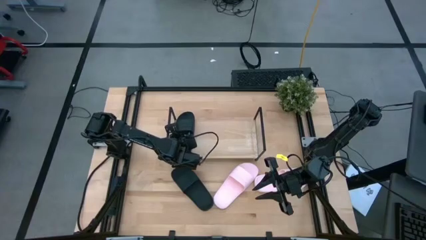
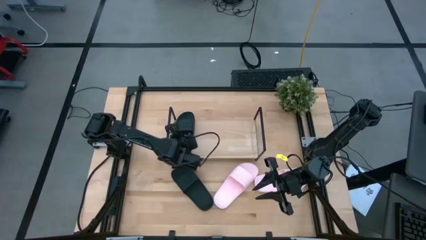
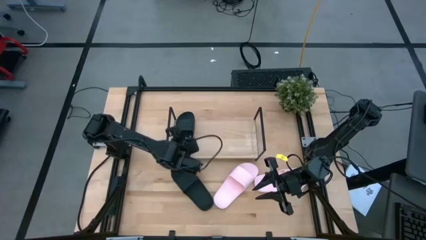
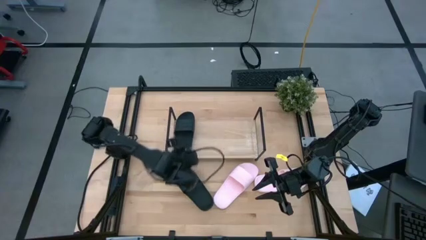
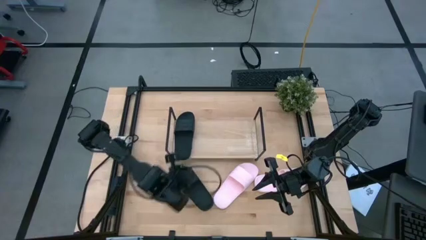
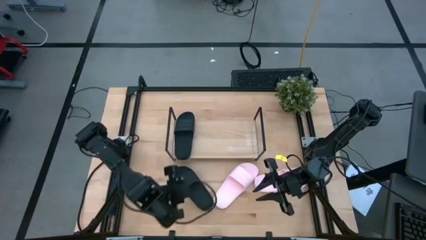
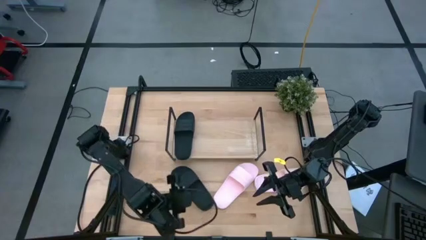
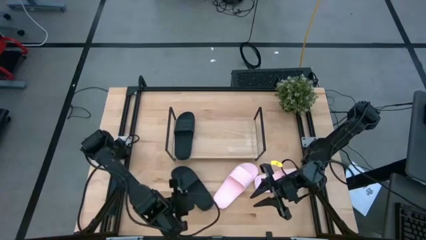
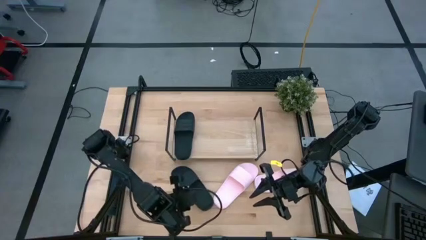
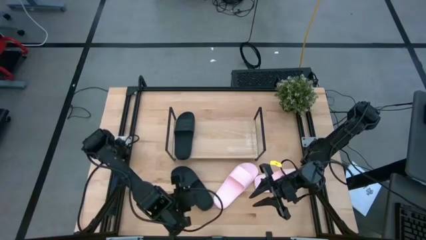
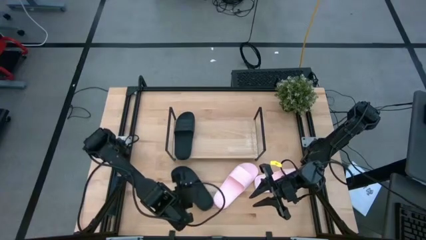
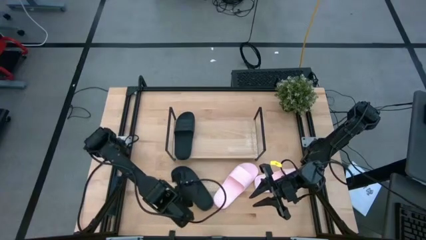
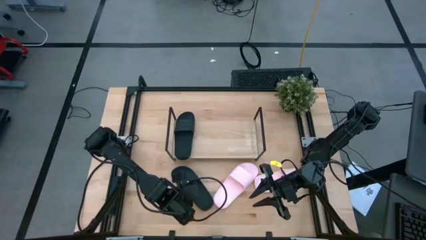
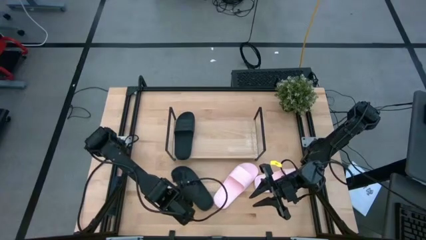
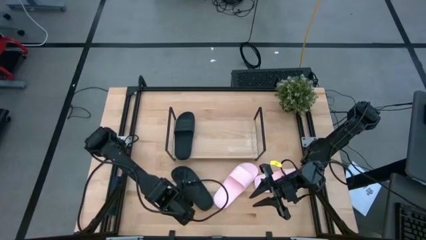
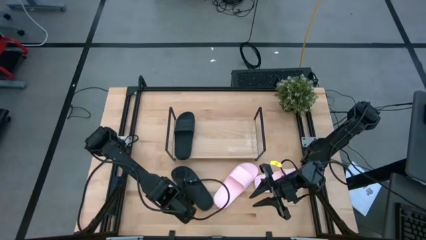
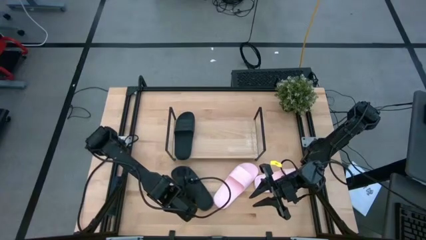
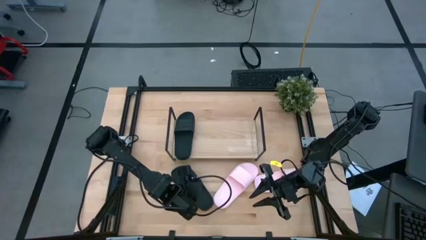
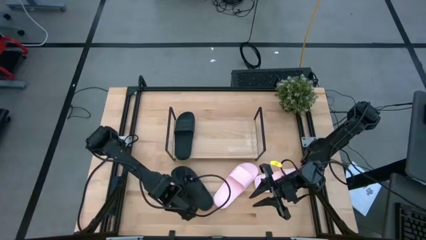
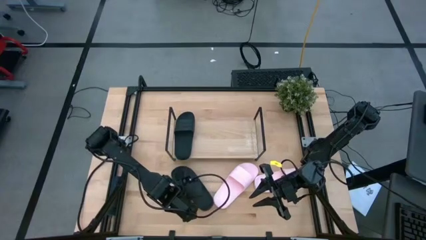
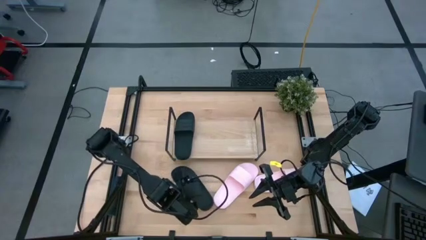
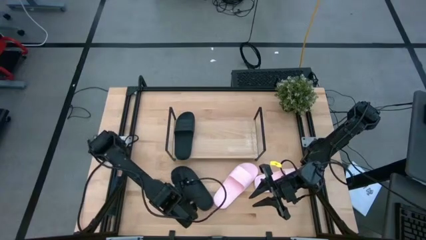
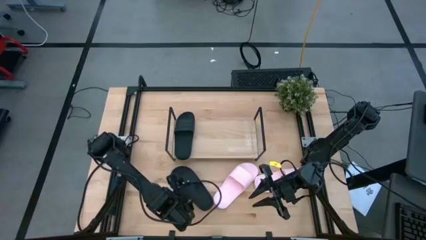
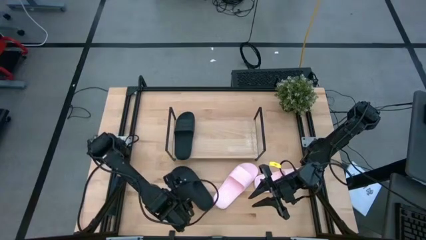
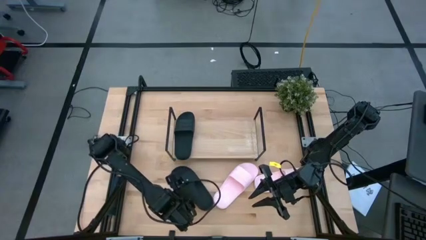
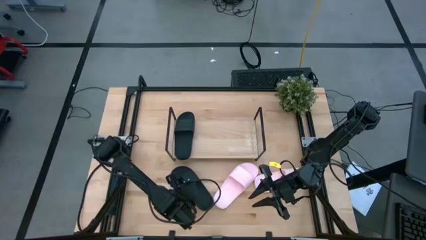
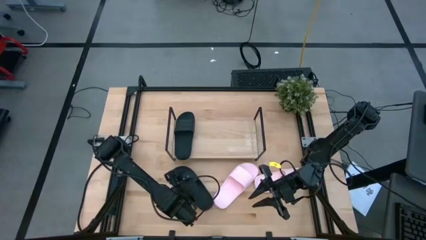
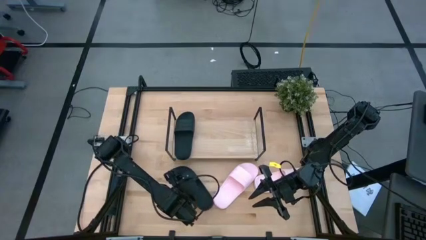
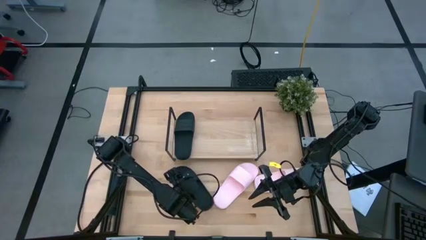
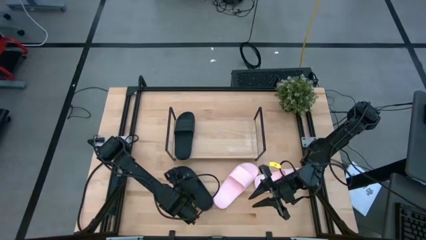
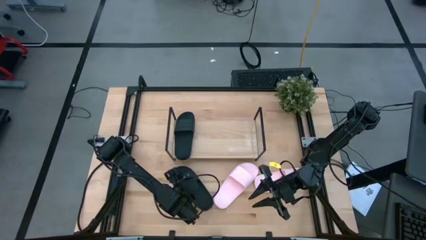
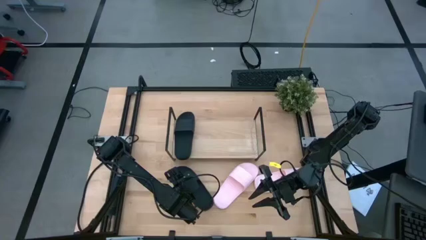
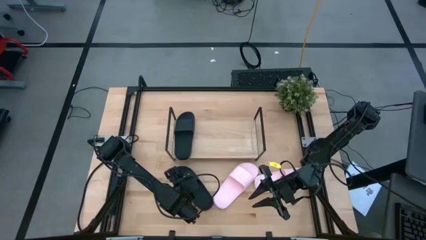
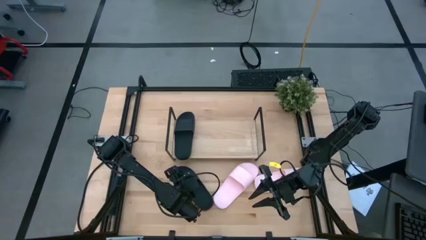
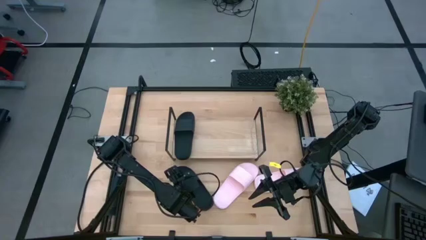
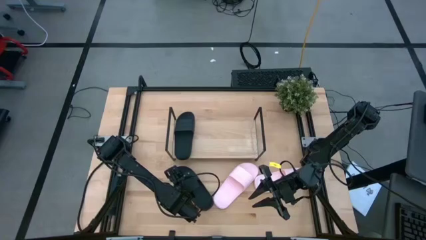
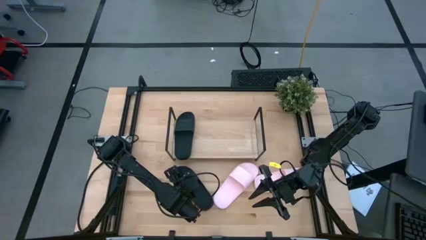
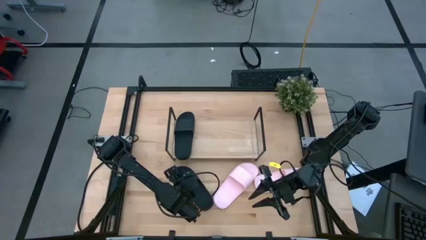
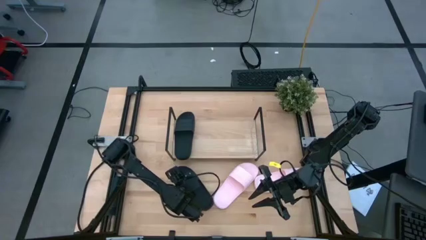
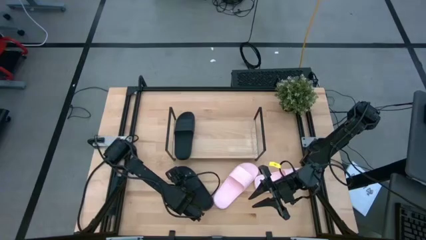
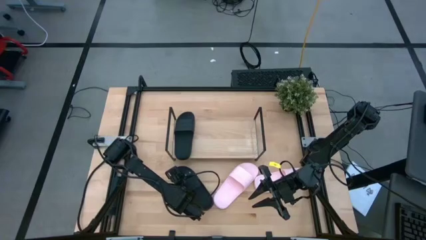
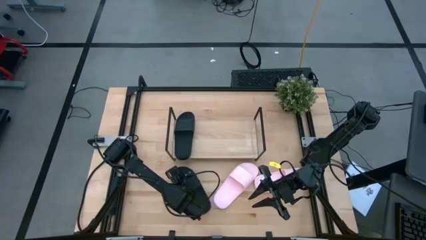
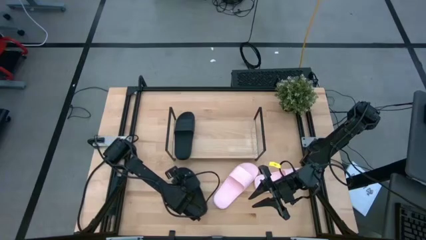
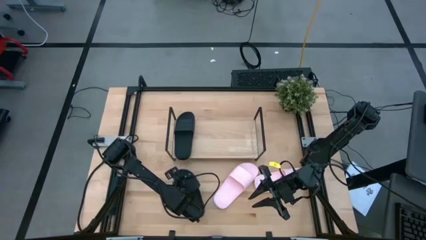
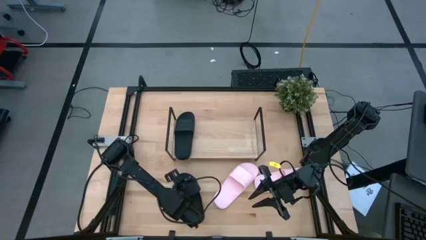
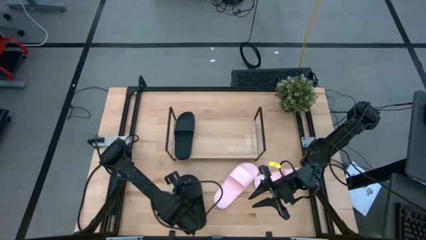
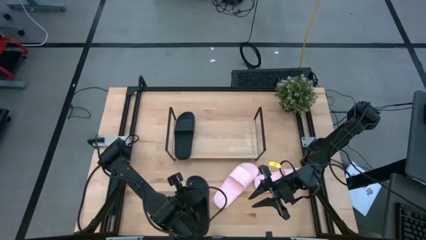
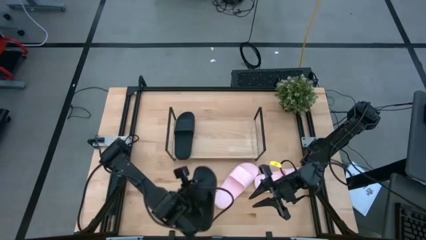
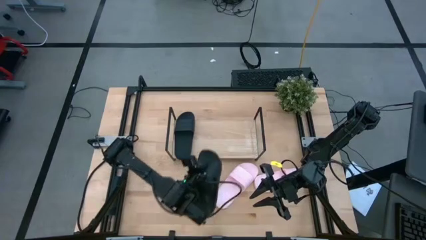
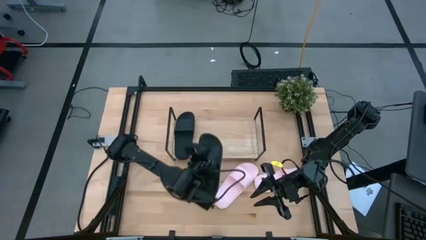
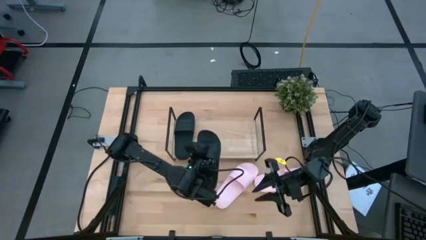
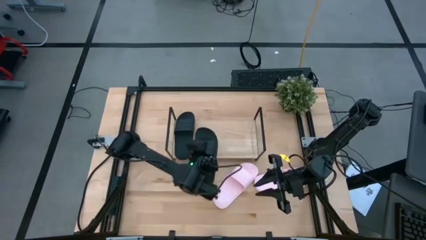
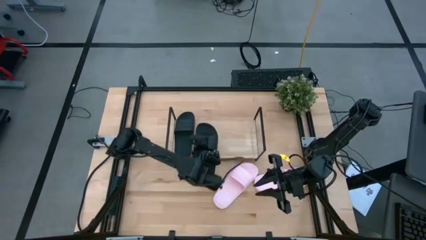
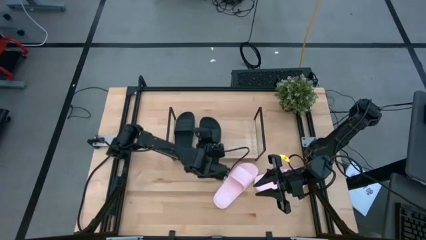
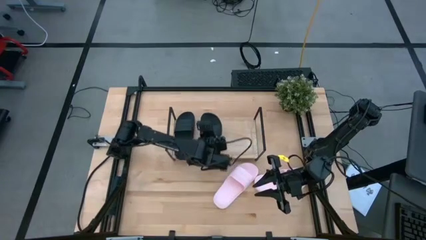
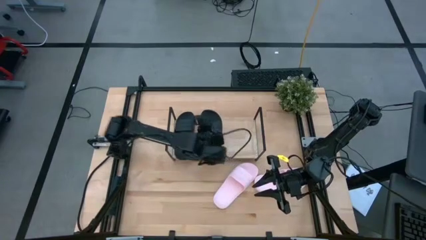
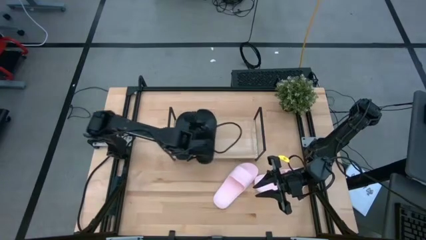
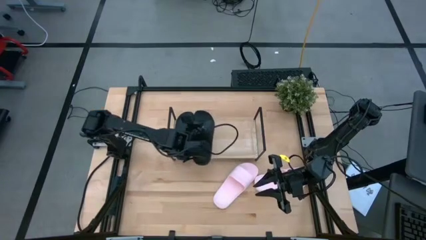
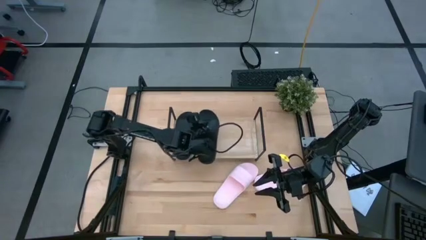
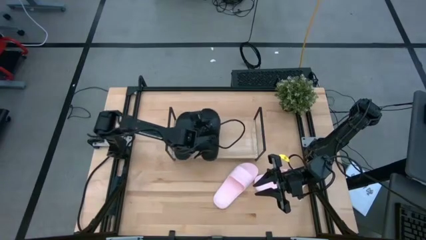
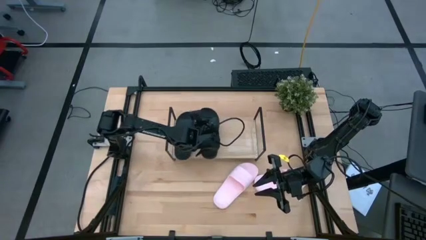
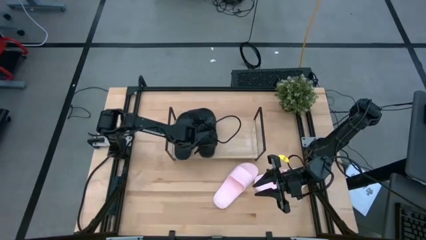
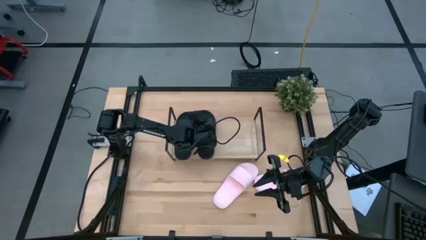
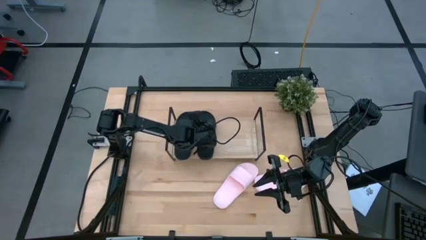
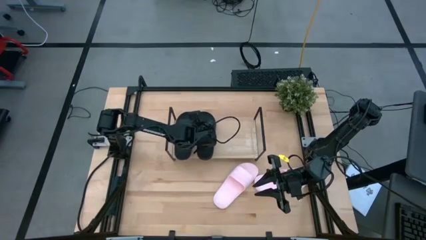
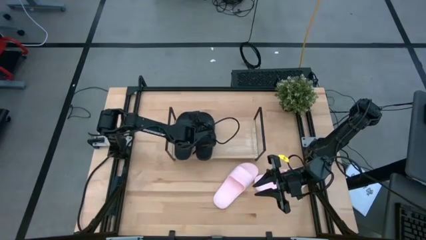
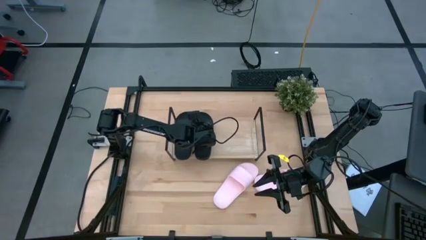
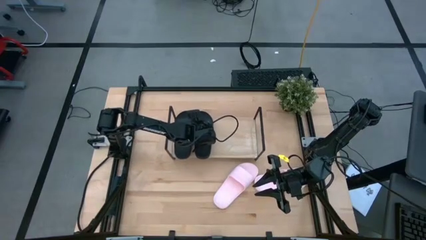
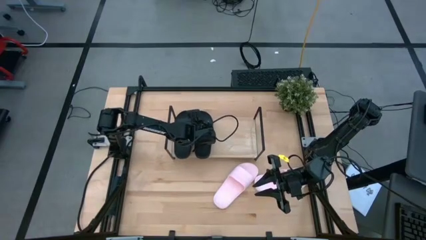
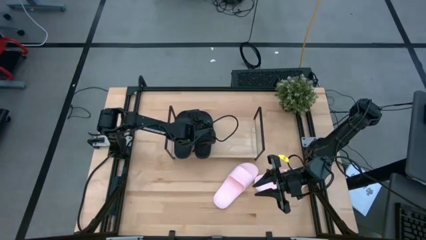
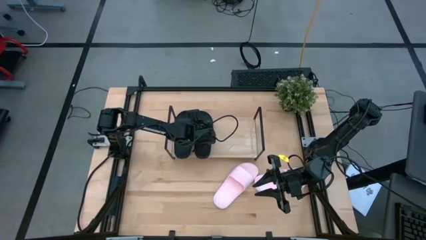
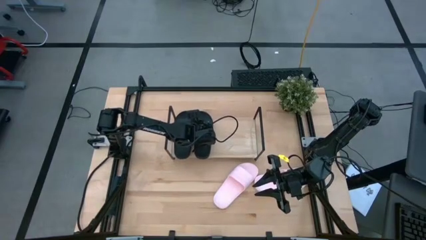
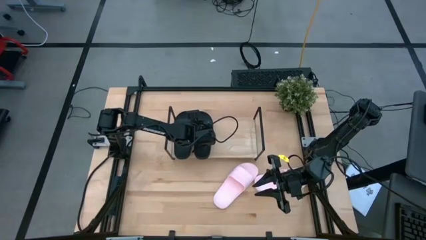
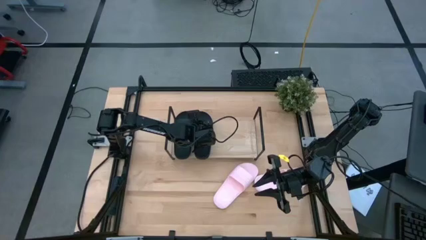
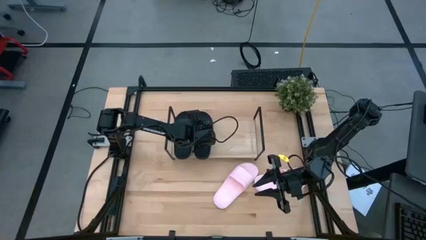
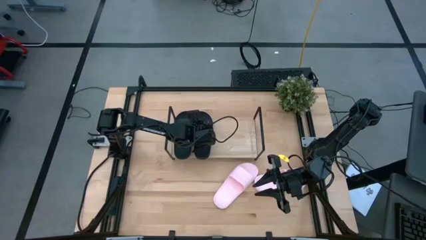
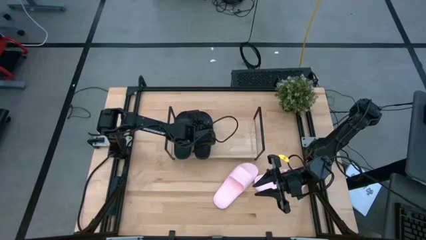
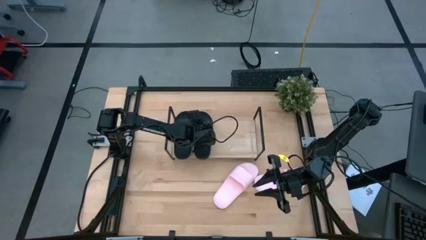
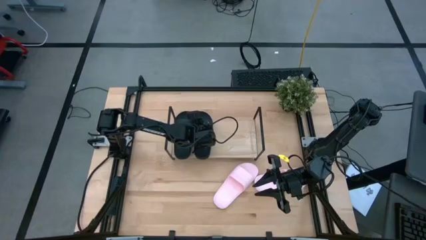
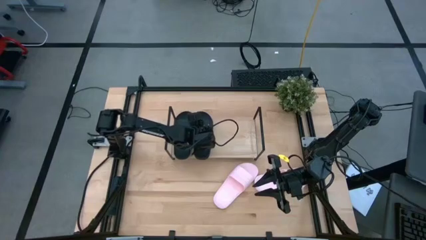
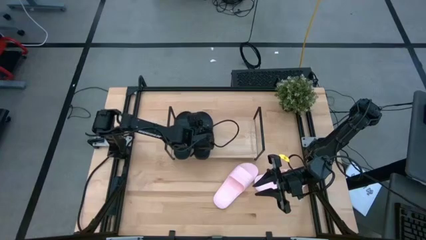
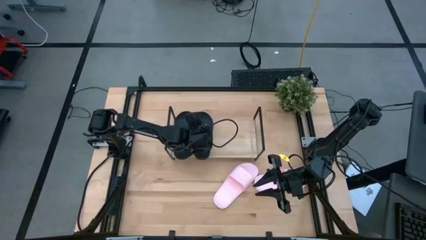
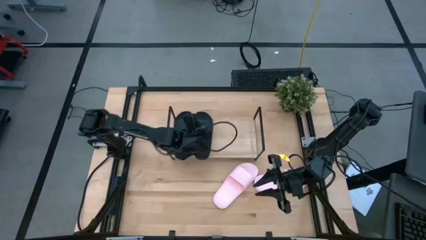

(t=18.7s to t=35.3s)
Task: Pick and place slides into the shelf
Put the black slipper on the shelf
